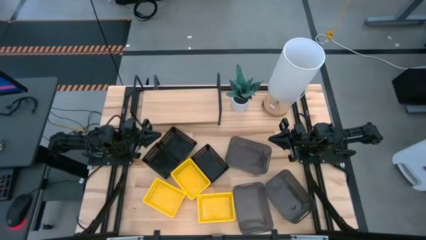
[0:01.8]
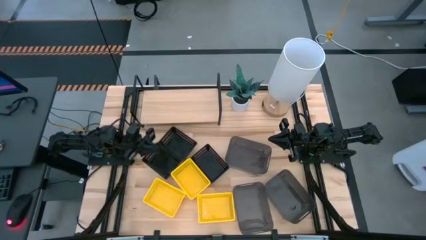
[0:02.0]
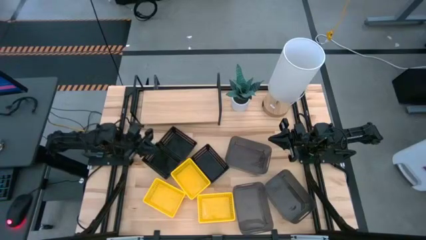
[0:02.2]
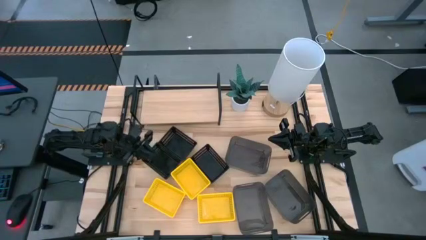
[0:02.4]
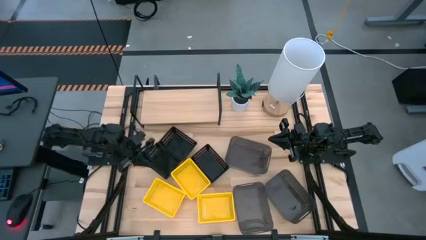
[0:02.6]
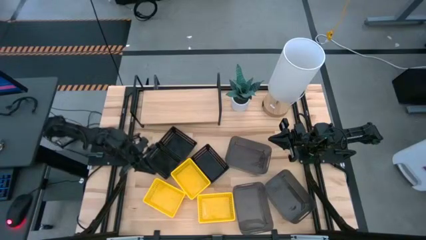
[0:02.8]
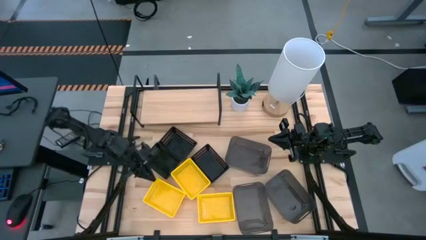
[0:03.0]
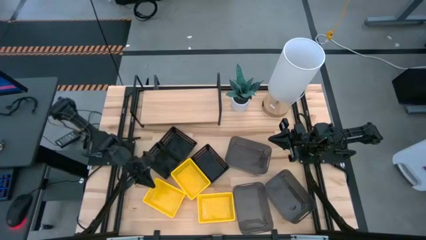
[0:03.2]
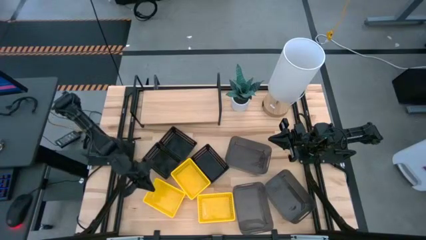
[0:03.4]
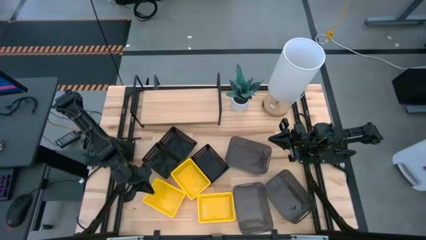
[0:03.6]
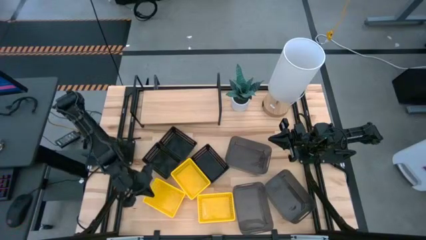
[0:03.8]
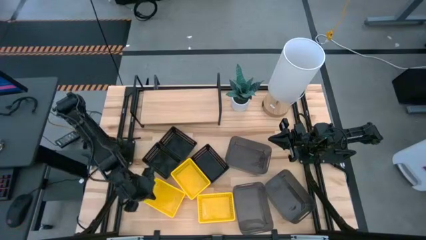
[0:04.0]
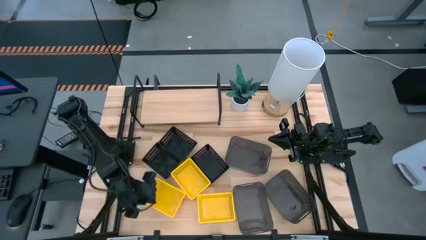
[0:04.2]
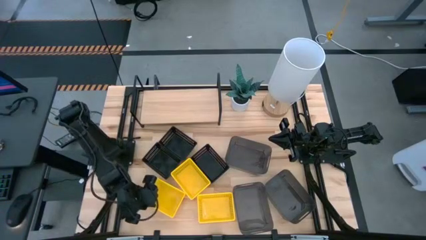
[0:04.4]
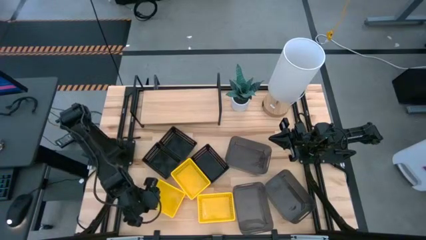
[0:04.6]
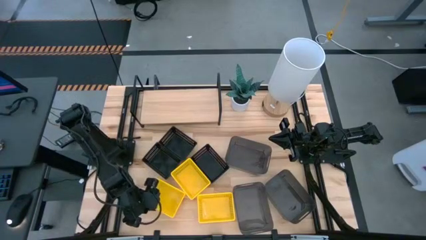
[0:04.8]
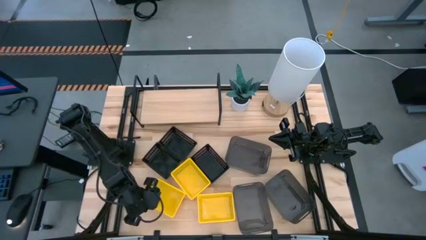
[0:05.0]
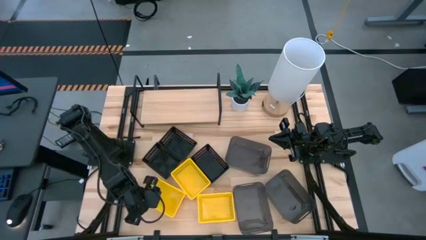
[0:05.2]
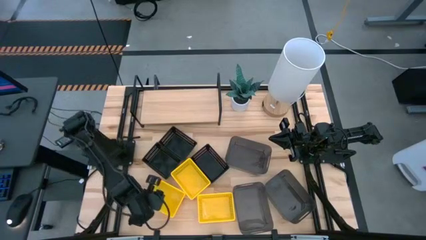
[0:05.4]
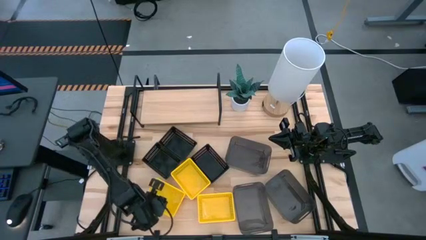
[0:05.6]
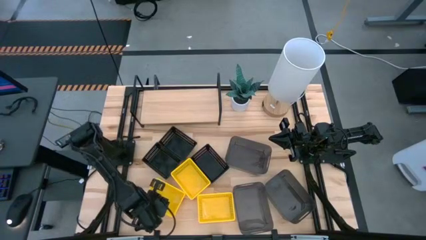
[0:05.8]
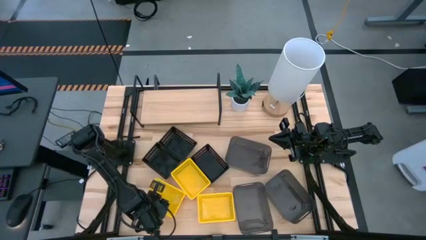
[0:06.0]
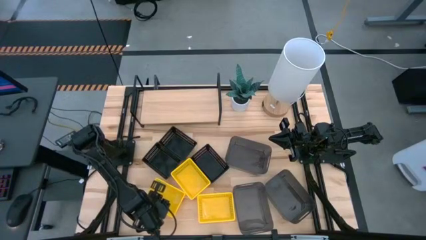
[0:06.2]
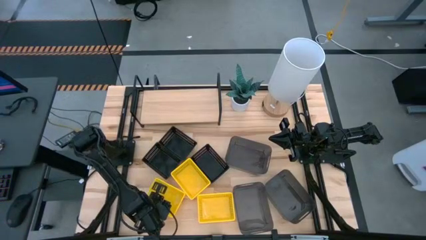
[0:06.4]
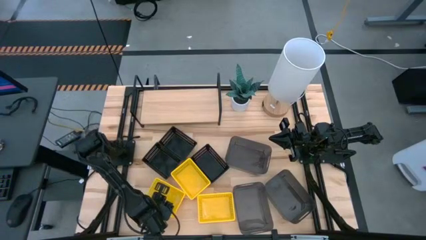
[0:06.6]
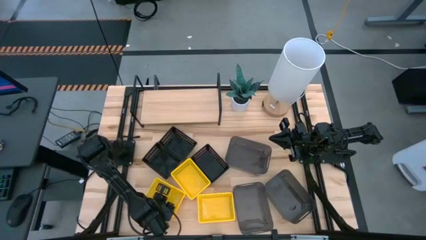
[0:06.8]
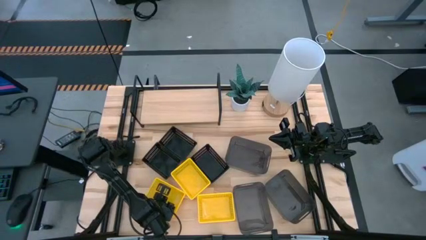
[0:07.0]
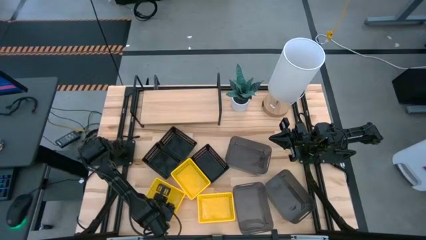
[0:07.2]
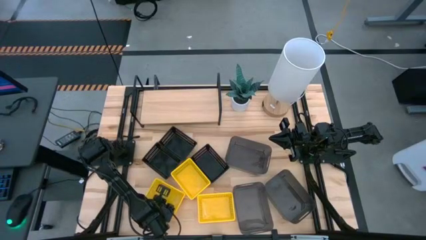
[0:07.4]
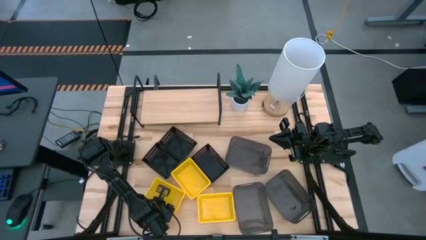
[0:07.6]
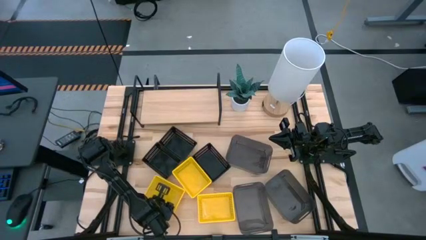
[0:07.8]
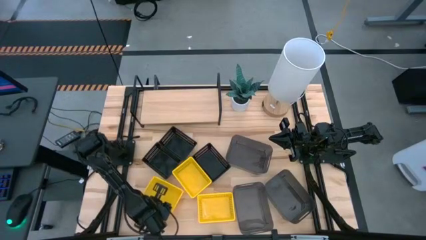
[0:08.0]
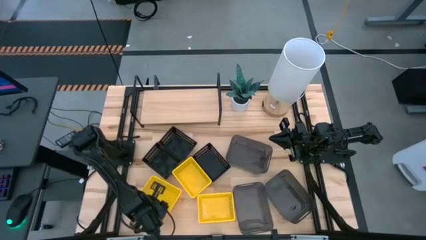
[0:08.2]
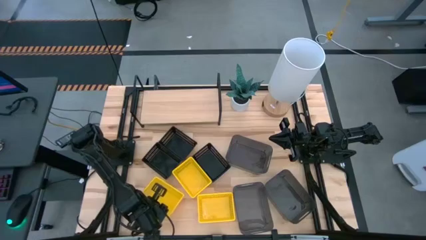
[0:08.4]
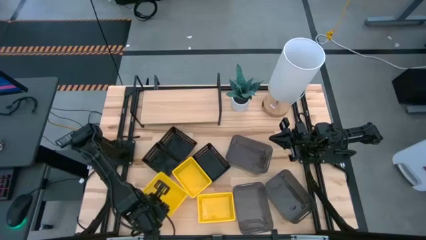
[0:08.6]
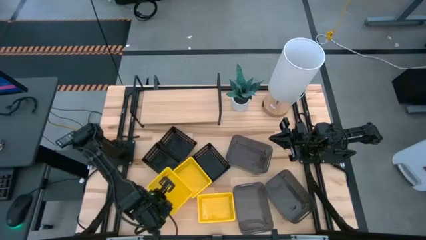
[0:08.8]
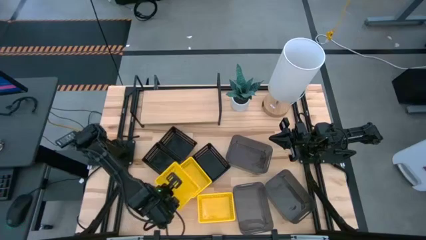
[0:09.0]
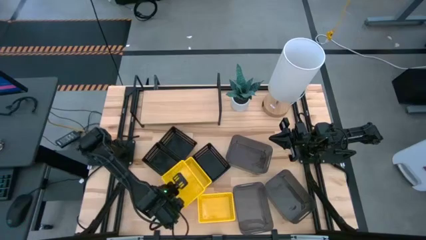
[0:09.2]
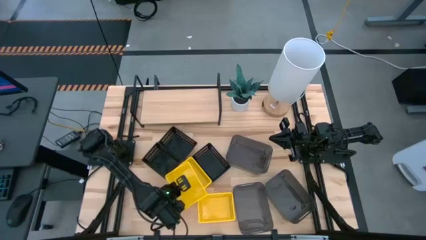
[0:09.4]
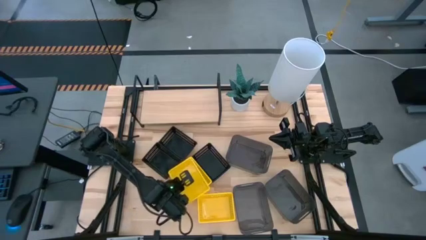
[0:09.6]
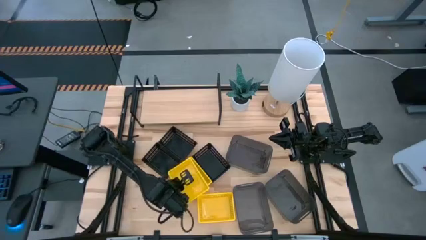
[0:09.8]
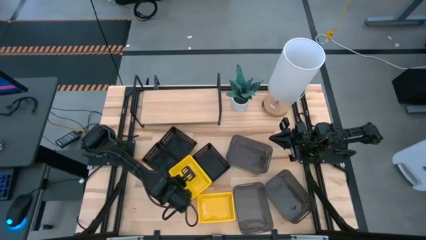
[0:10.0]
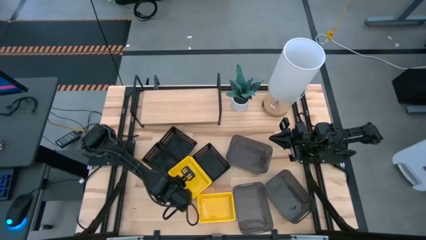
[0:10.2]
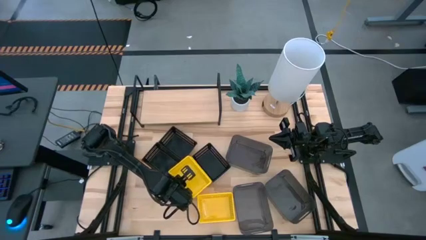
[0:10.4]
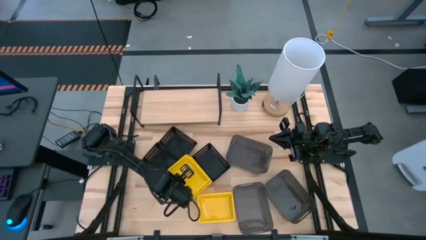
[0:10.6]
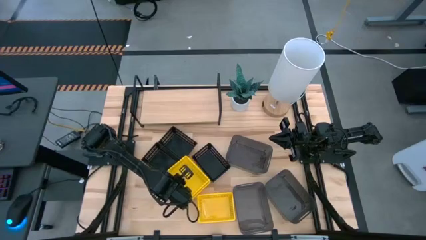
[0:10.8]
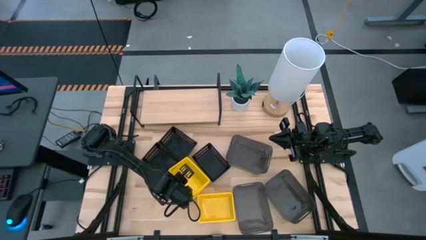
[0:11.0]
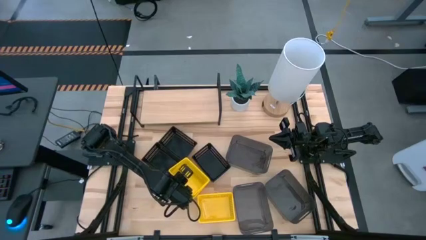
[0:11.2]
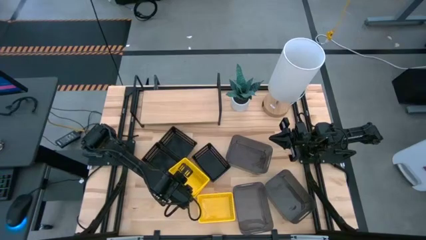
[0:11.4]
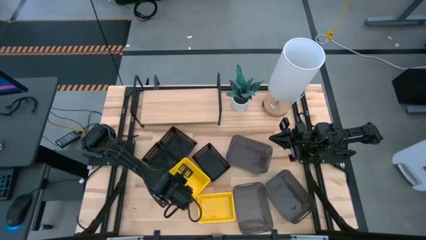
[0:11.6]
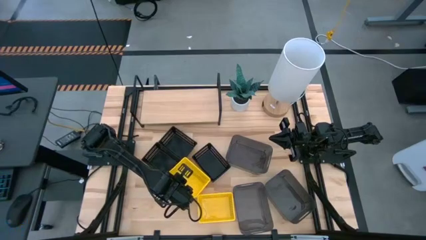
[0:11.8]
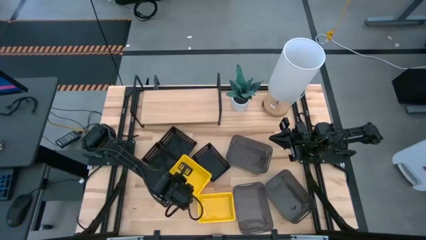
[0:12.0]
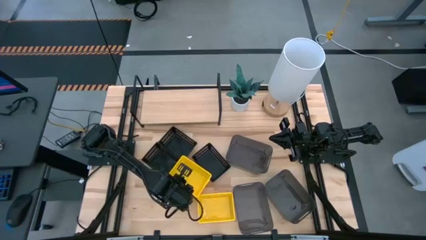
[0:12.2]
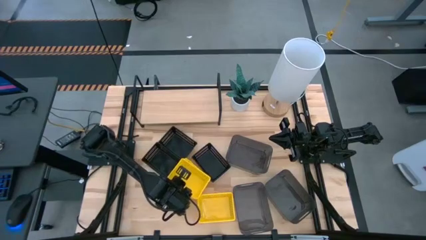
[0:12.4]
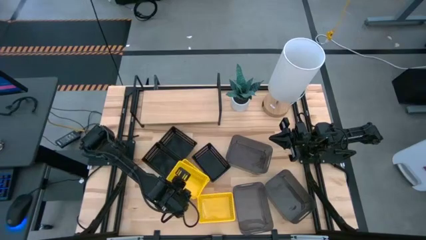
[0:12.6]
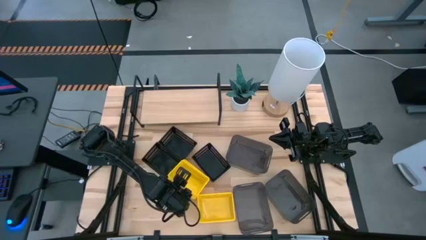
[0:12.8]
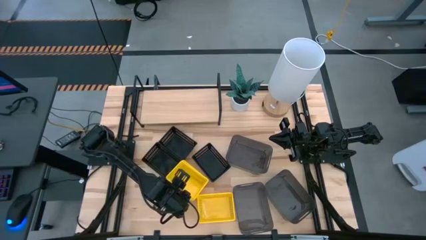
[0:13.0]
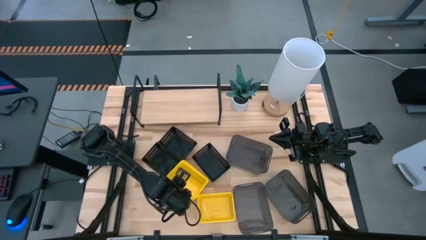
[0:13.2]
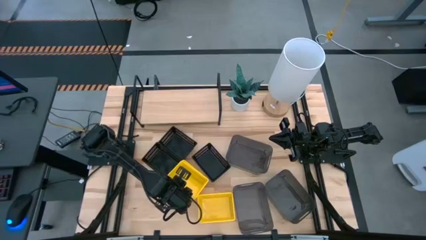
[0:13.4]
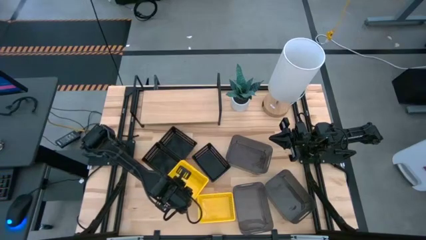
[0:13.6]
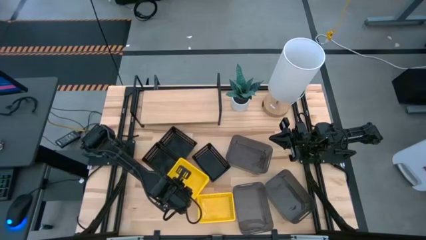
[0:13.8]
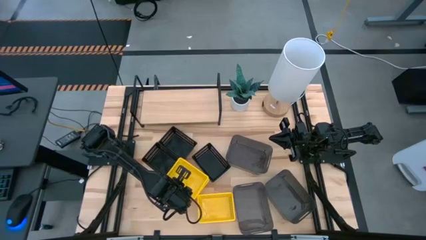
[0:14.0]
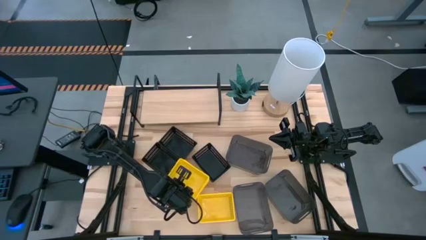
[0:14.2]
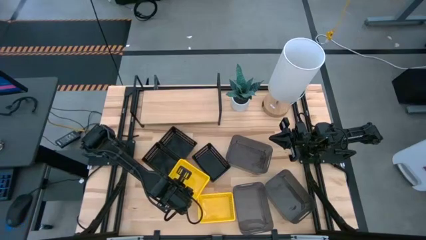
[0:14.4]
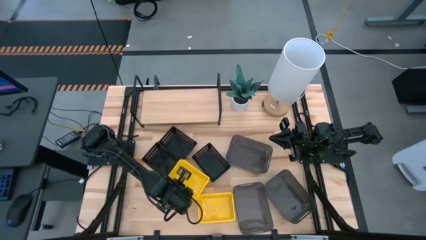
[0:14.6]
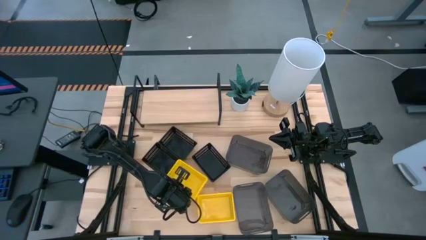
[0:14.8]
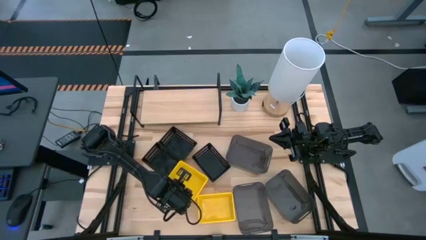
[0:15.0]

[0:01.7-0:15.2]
Task: Stack baskets on shelf by color
Stack the bottom left yellow bin on top of the middle yellow bin

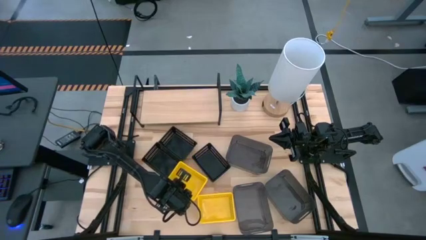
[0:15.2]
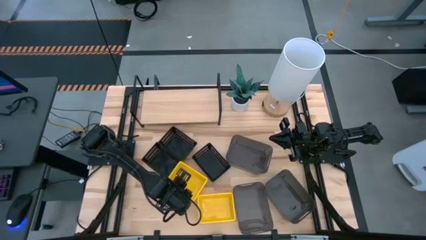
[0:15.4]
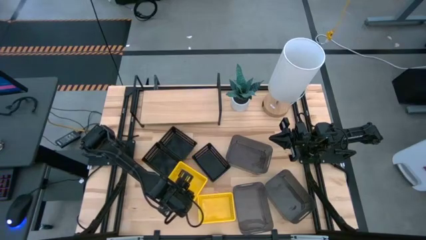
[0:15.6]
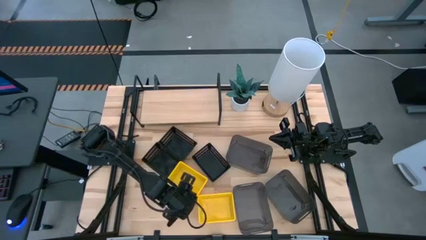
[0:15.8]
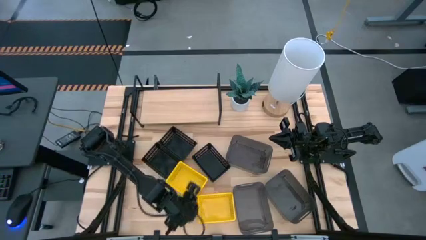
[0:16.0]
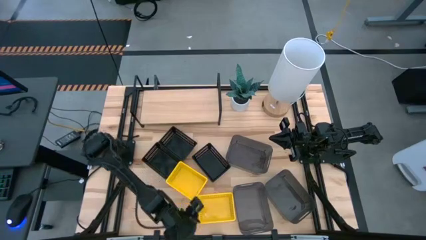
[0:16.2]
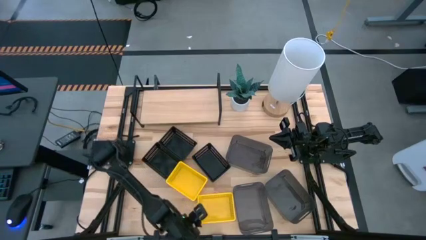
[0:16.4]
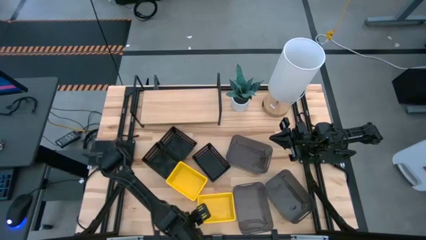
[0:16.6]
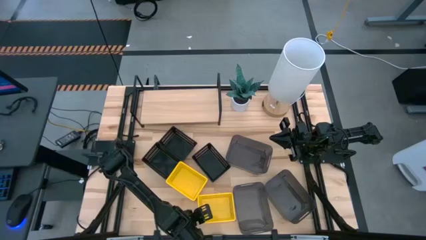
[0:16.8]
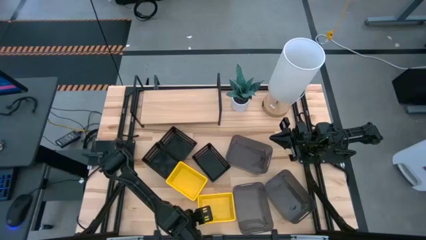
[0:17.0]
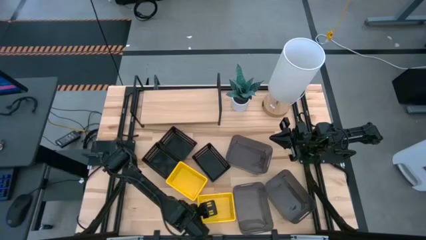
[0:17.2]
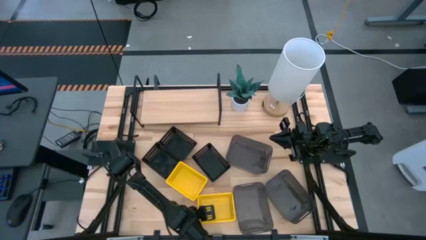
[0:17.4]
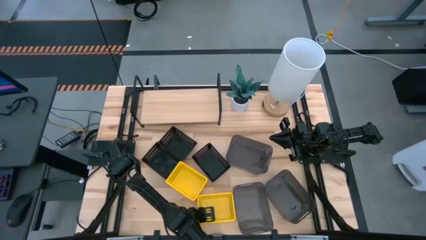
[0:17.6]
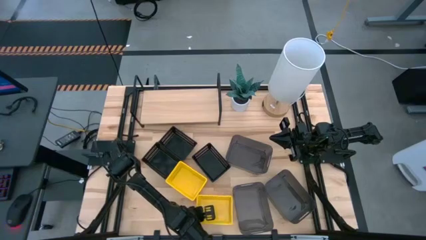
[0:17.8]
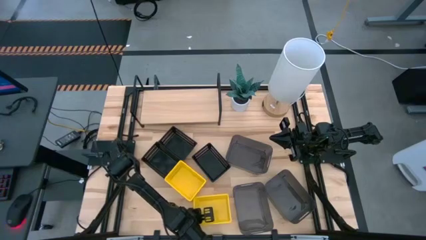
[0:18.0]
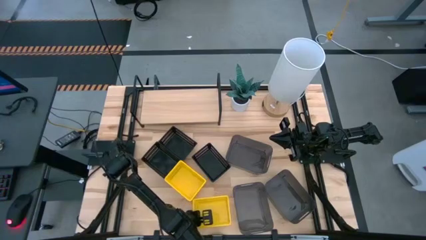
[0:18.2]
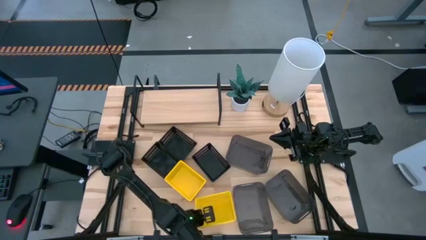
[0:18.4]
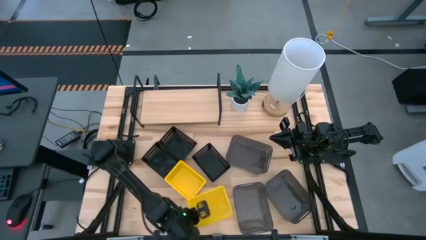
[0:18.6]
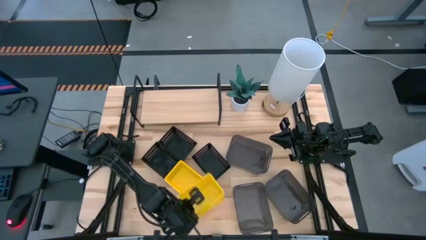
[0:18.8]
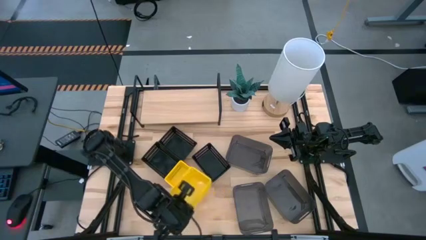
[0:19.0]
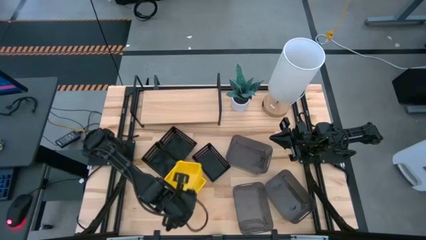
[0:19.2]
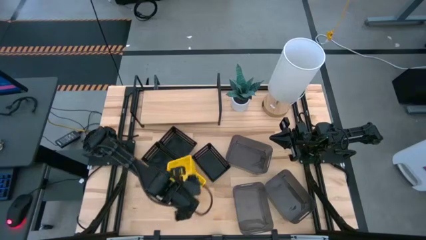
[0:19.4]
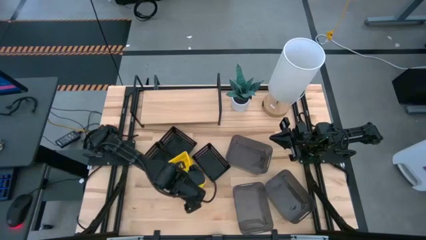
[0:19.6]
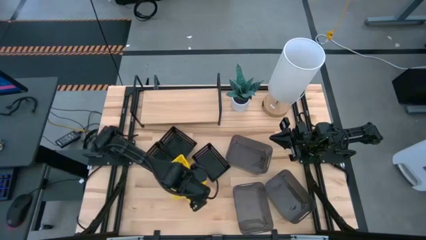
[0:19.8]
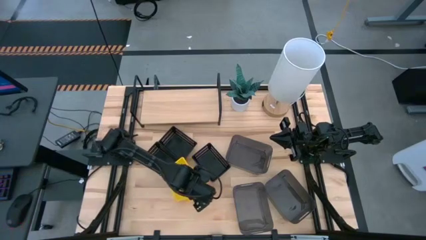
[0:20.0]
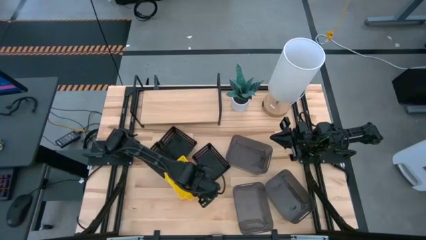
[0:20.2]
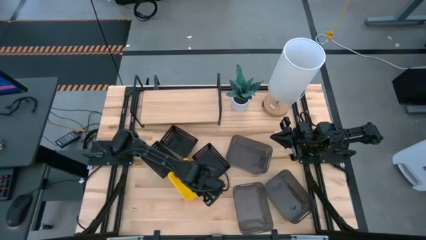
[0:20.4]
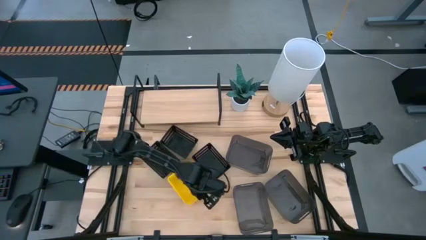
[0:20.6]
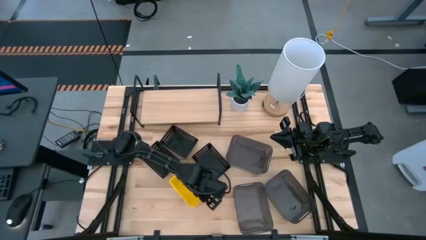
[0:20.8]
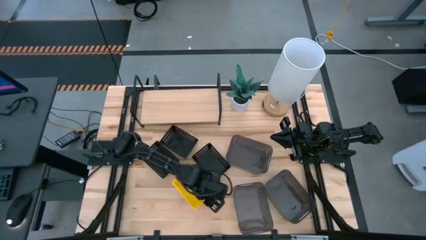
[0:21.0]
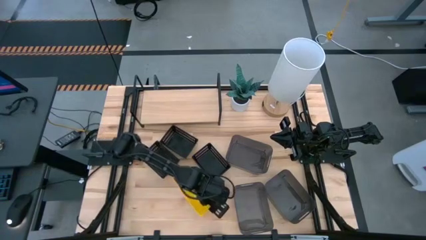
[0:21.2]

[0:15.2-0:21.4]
Stack the bottom right yellow bin on top of the top yellow bin
